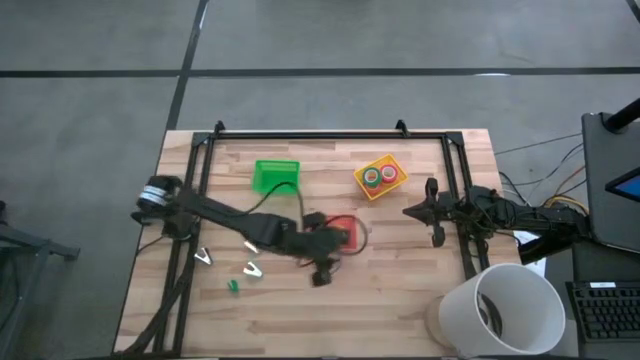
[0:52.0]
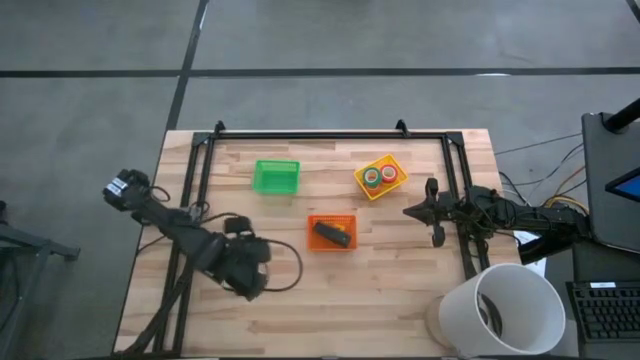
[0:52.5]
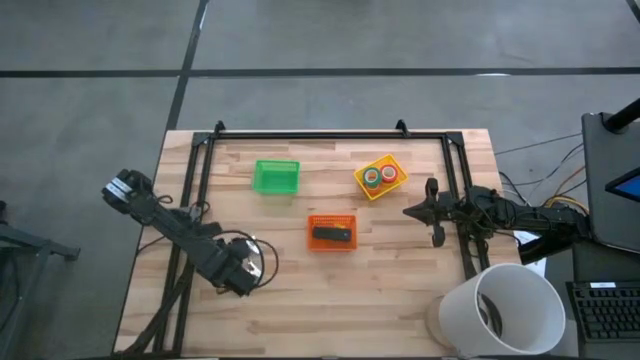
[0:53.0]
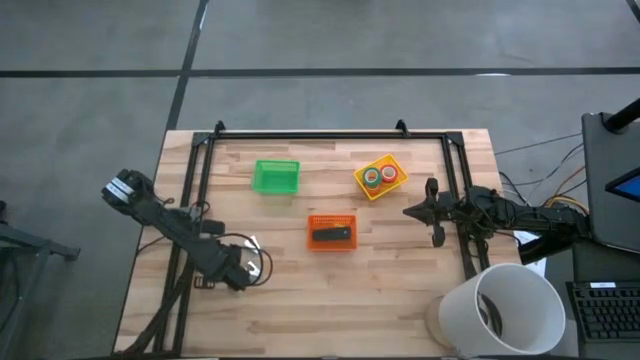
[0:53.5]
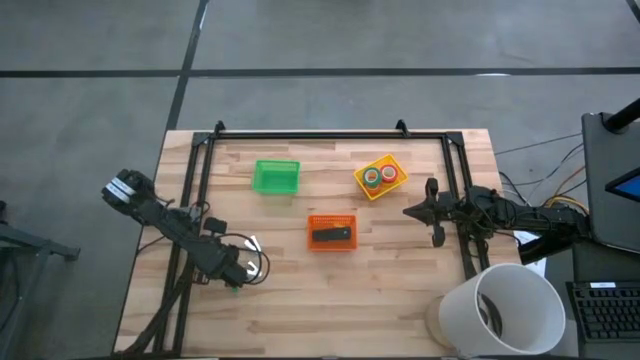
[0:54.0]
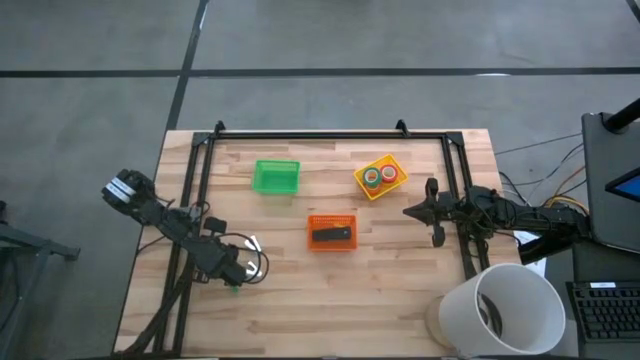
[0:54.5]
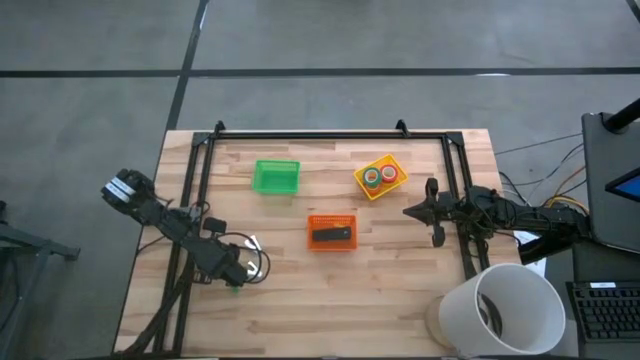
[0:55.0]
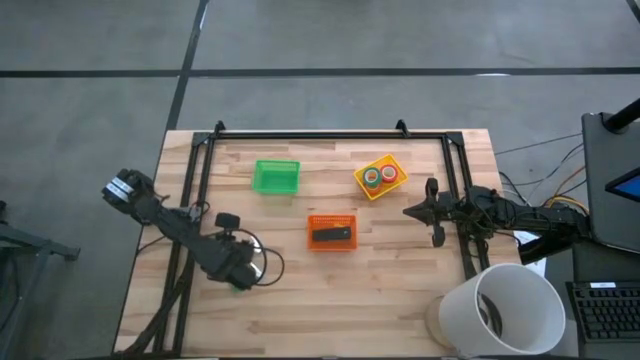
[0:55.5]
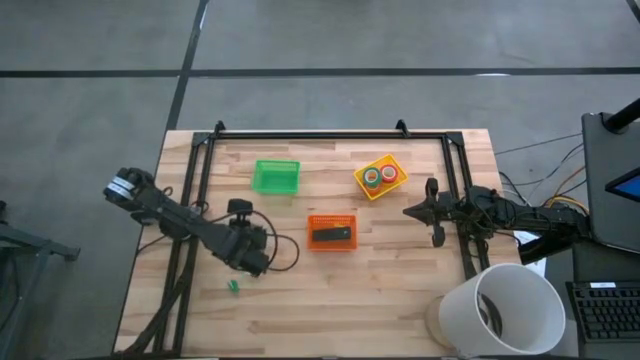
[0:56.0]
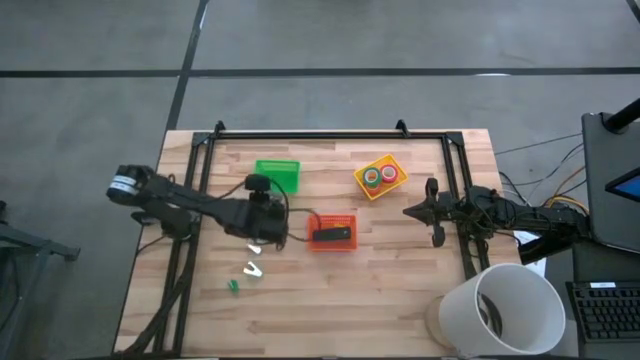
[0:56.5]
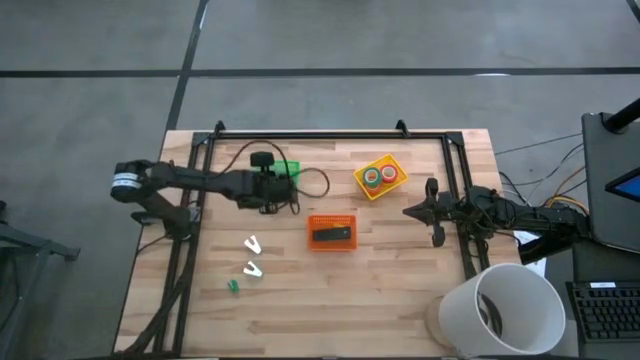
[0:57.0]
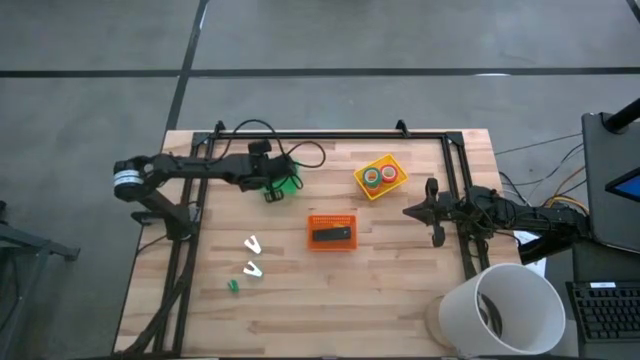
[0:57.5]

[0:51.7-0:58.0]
Task: Pick and place Stapler, Stapler remover, tape
Put the black staple remover into the green bin

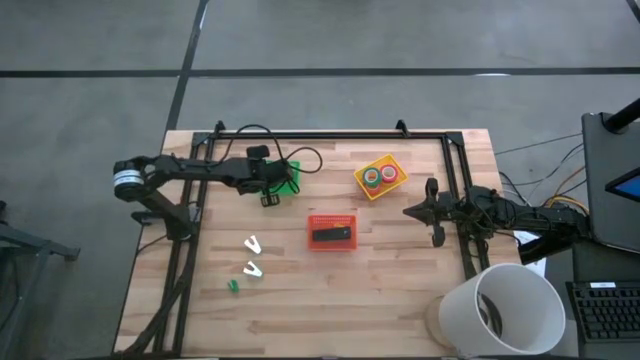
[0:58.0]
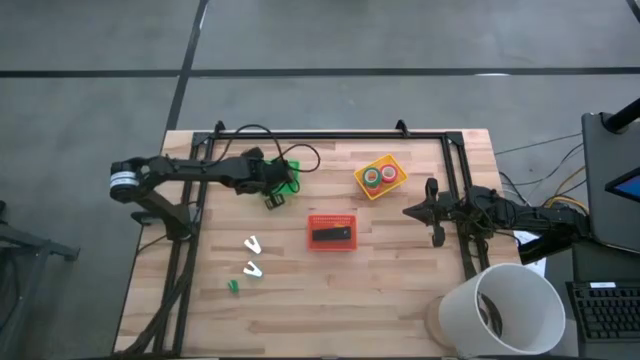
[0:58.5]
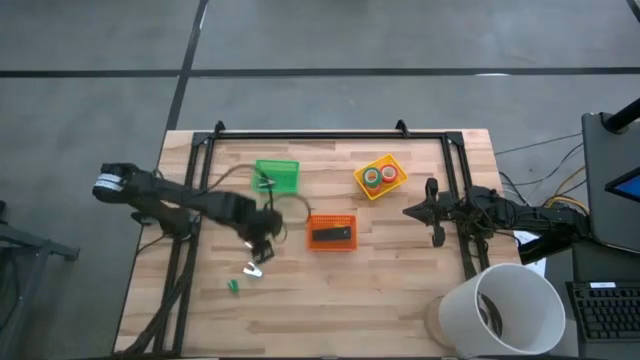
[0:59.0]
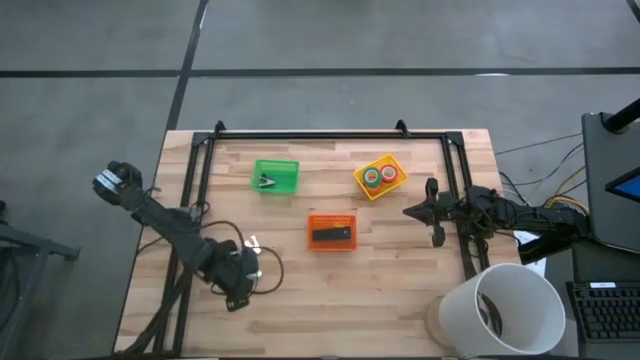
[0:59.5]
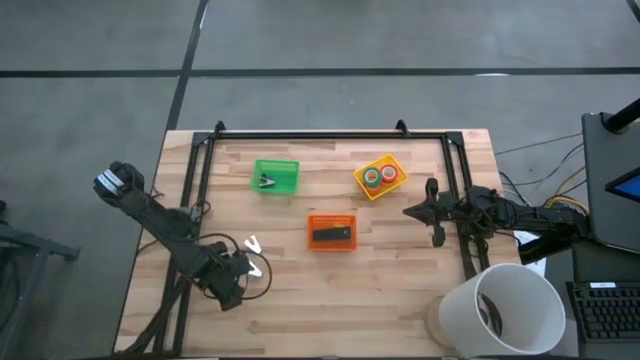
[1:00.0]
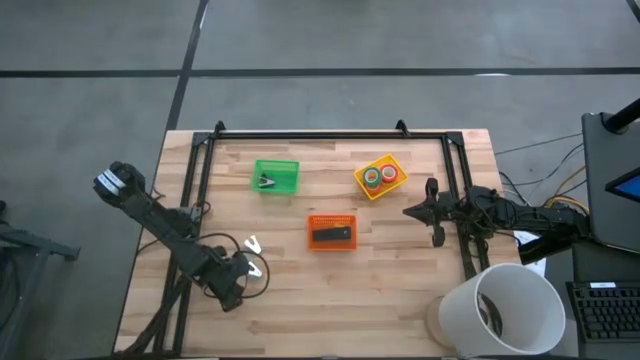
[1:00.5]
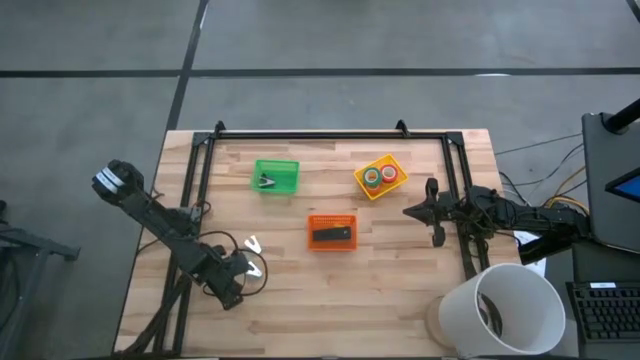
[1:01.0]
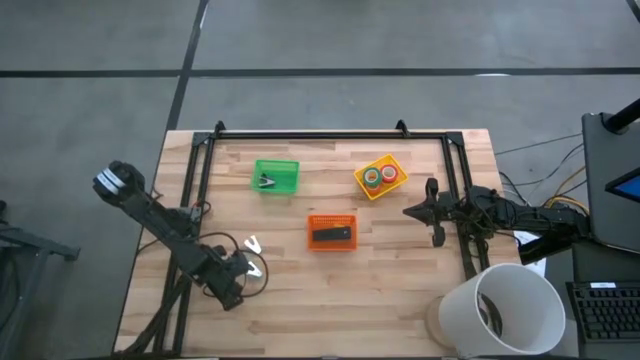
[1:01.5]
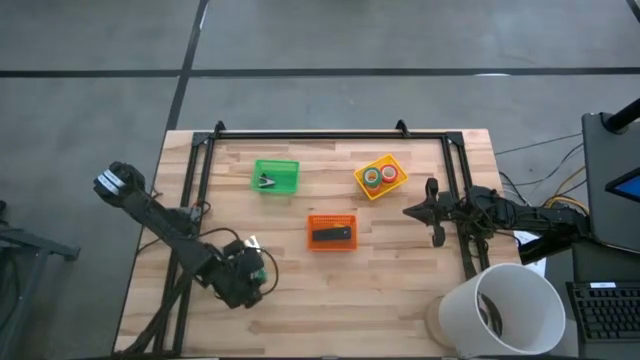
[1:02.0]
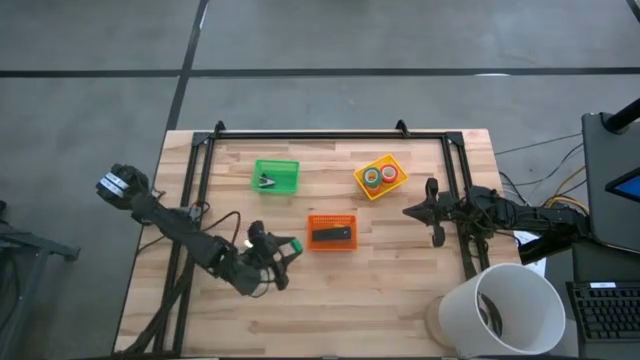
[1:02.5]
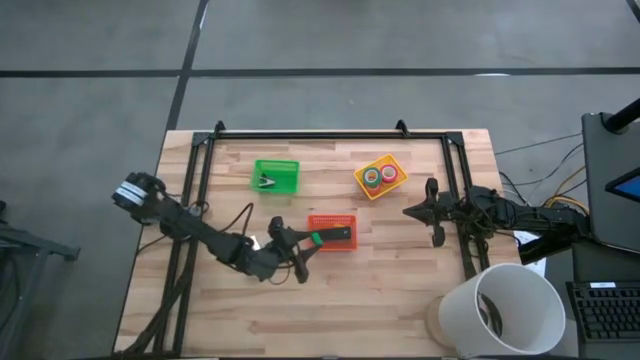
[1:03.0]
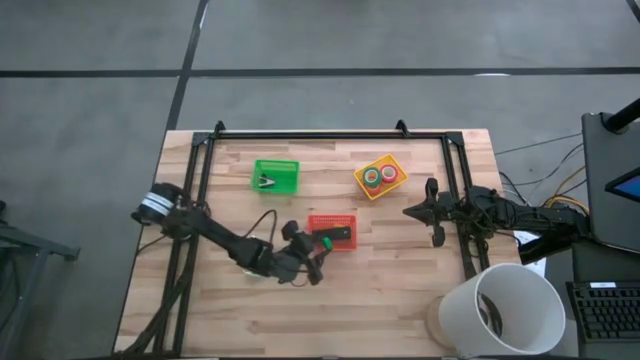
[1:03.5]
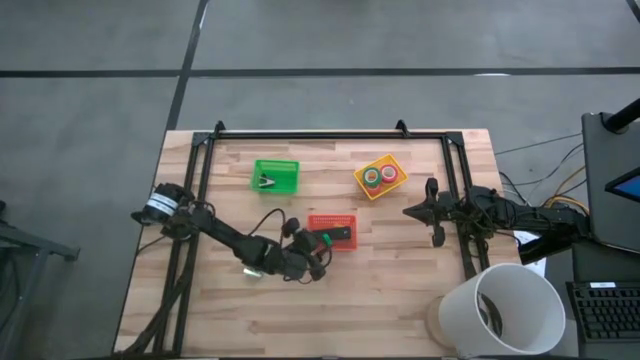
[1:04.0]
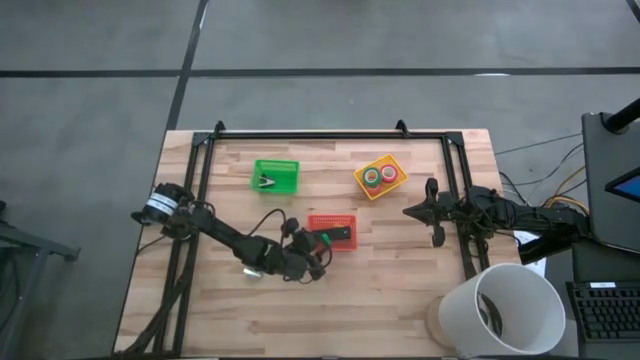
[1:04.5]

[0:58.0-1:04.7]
Put the small green stapler into the orange bin

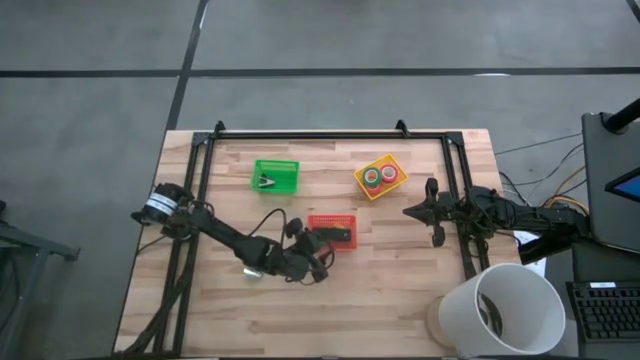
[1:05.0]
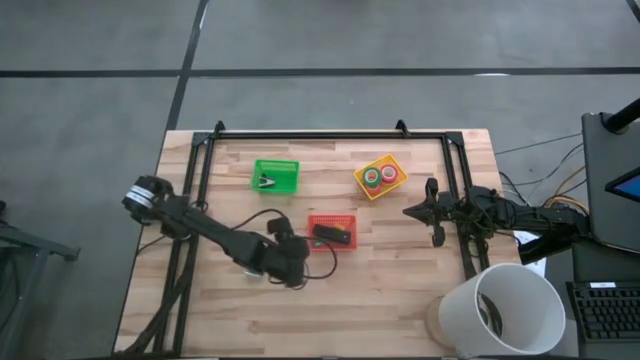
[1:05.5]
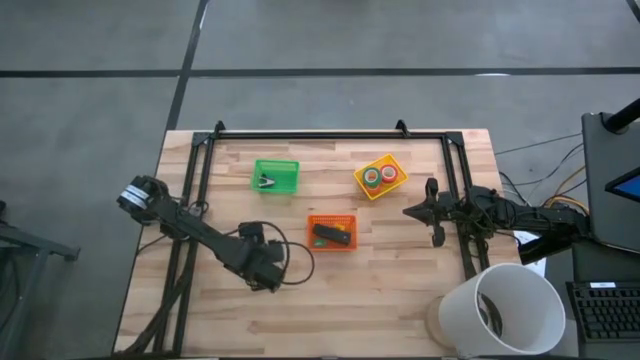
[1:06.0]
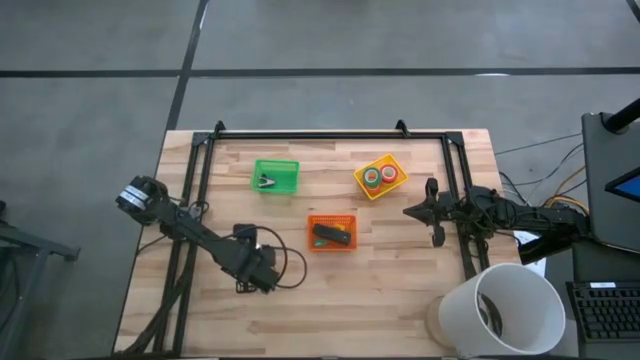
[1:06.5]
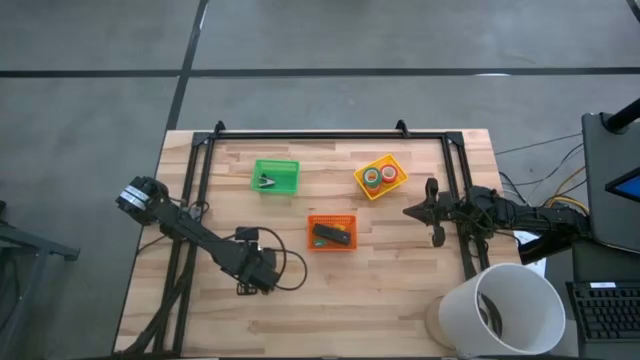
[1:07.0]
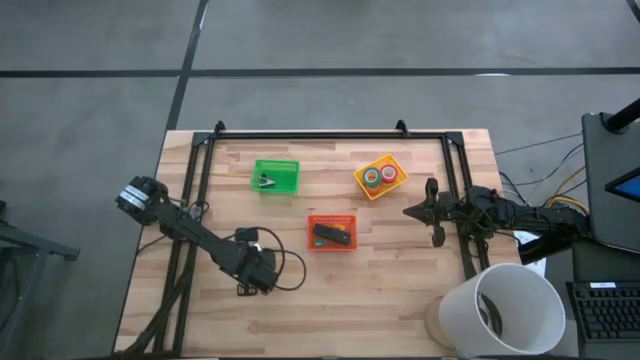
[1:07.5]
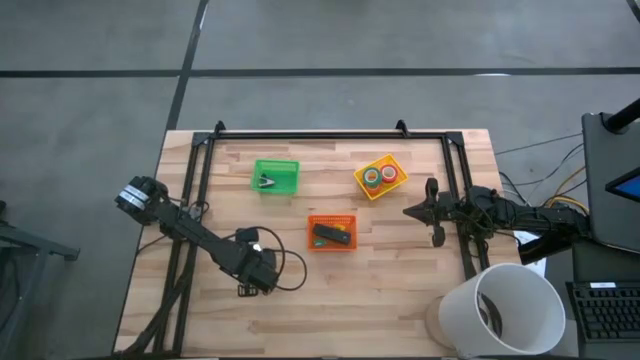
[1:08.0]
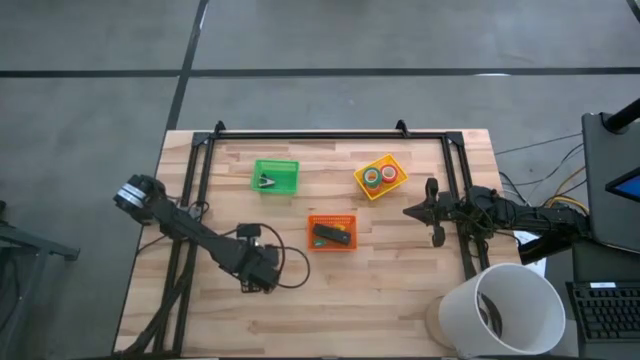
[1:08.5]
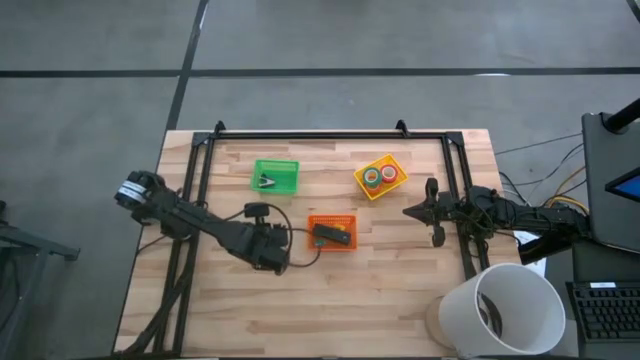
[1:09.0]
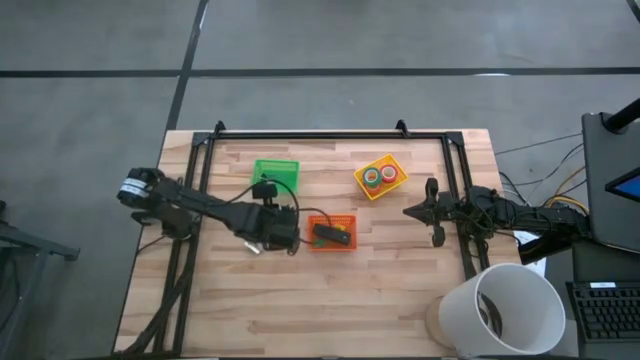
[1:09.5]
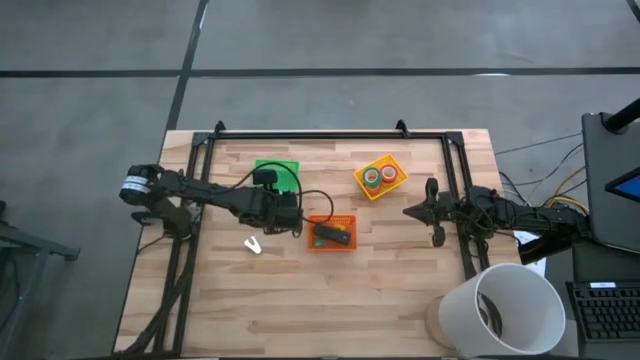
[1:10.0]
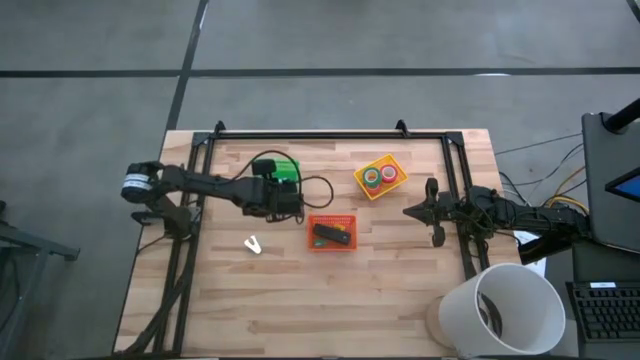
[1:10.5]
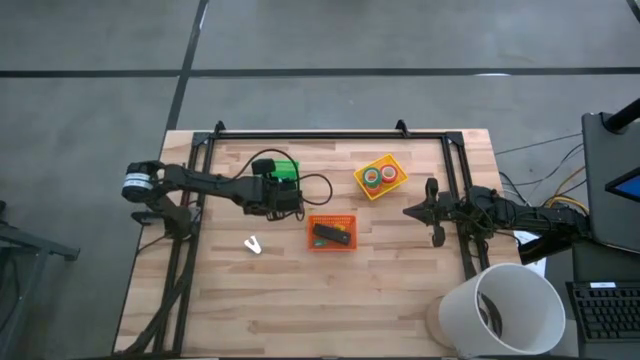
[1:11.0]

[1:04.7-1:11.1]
Put the bottom blue staple remover into the green bin

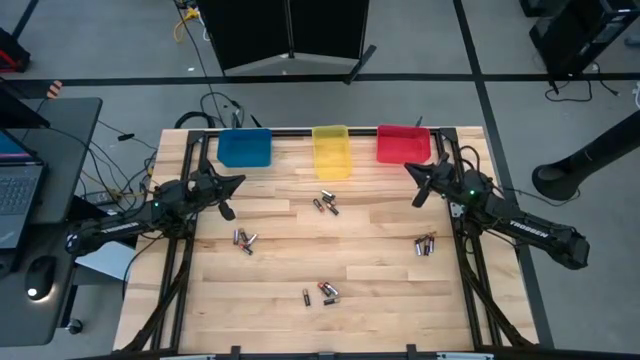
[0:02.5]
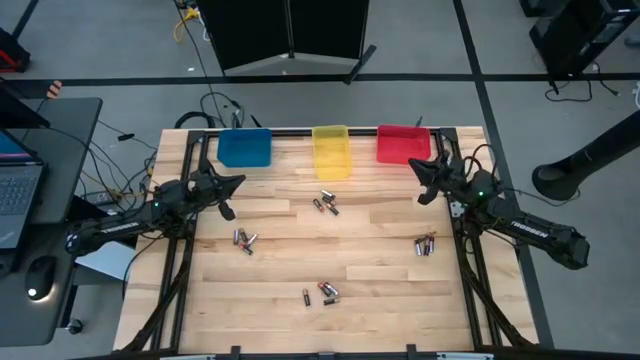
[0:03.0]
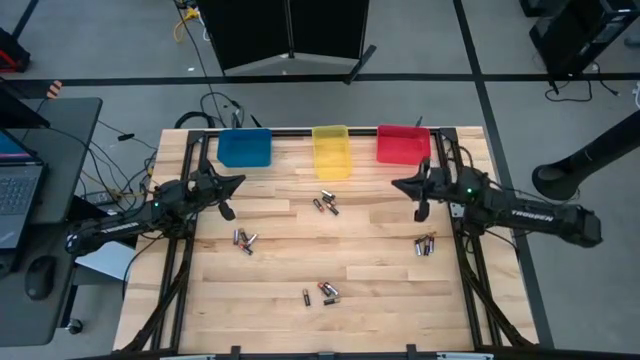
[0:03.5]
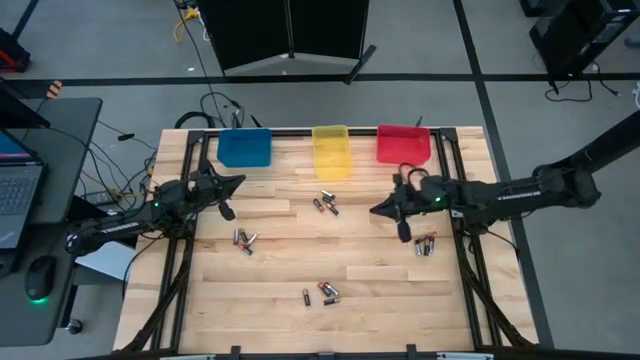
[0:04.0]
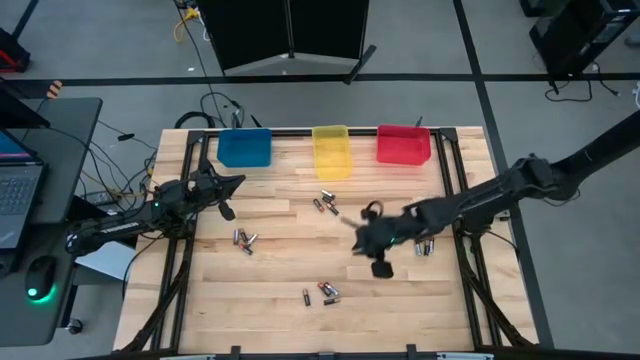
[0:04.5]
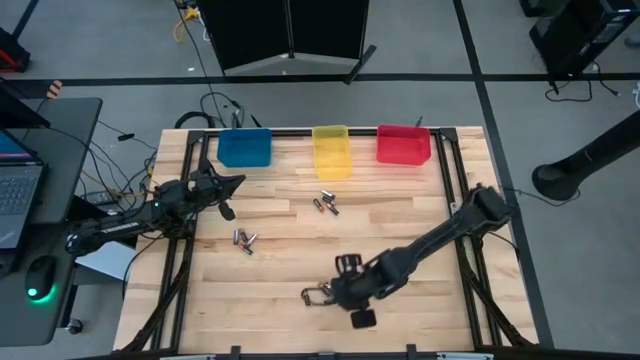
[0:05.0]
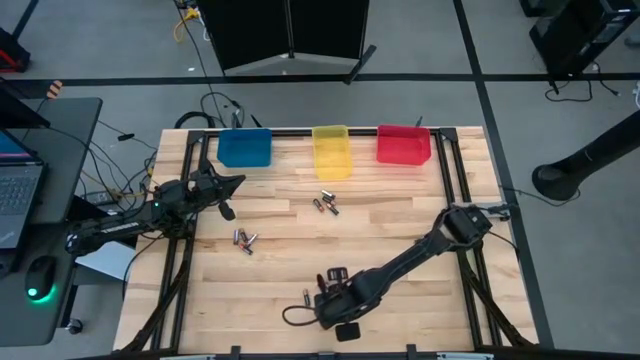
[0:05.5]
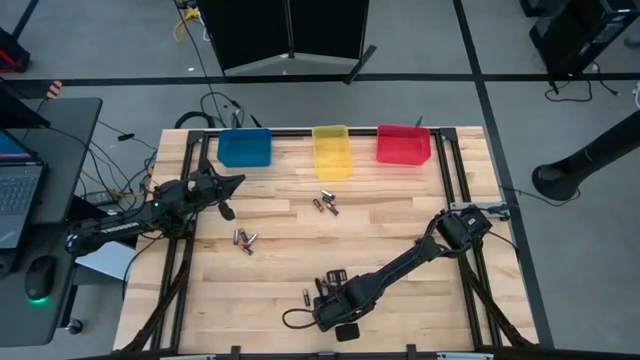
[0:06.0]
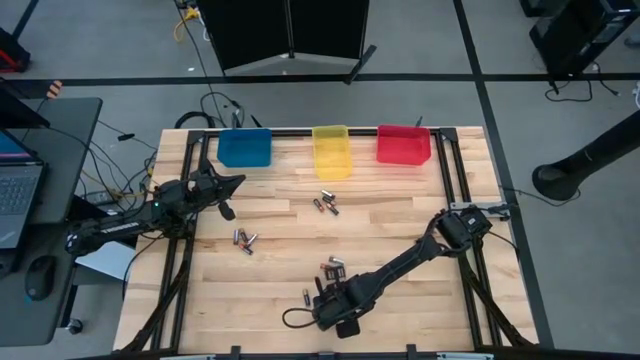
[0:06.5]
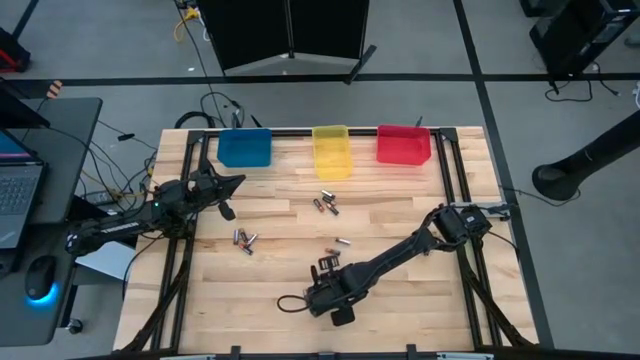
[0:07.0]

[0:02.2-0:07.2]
Task: Sort batteries
Put the black brown battery into the red bin
